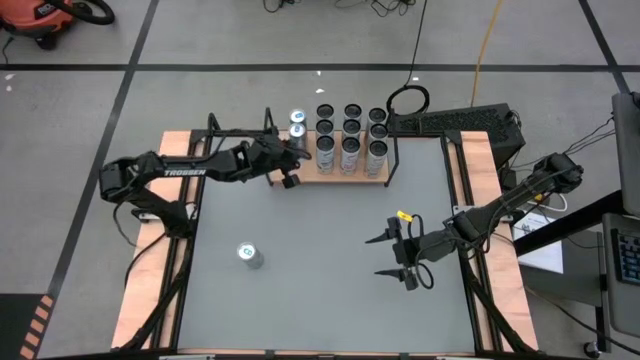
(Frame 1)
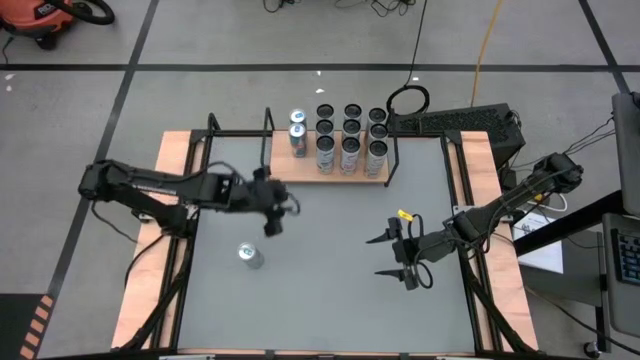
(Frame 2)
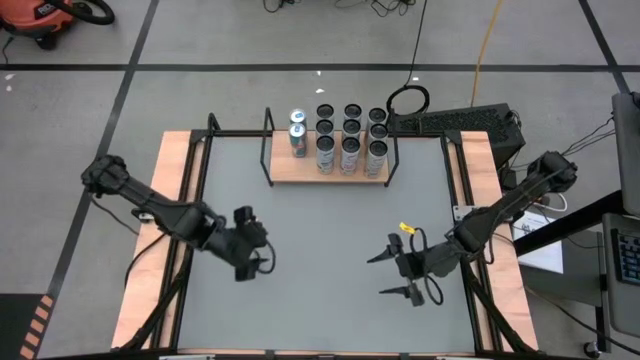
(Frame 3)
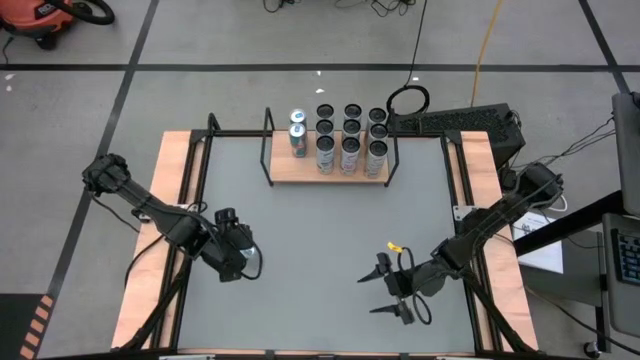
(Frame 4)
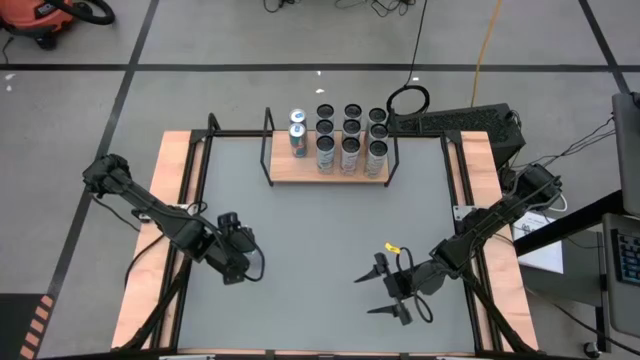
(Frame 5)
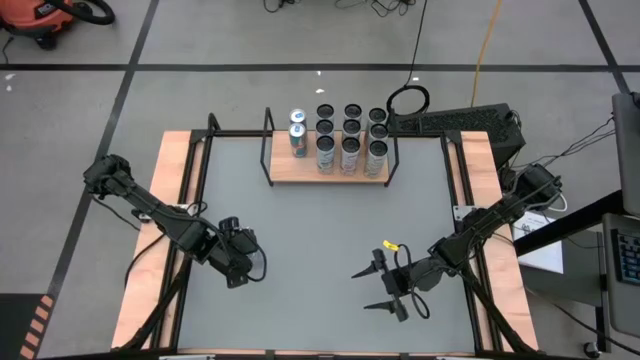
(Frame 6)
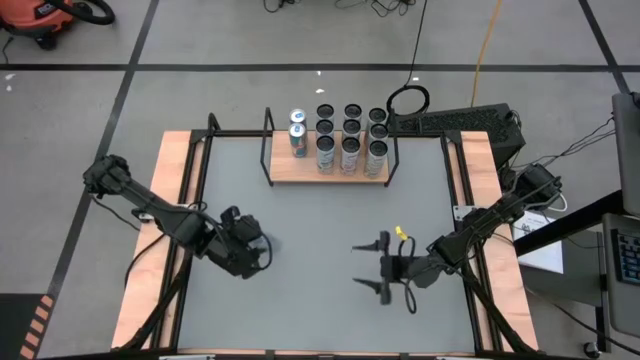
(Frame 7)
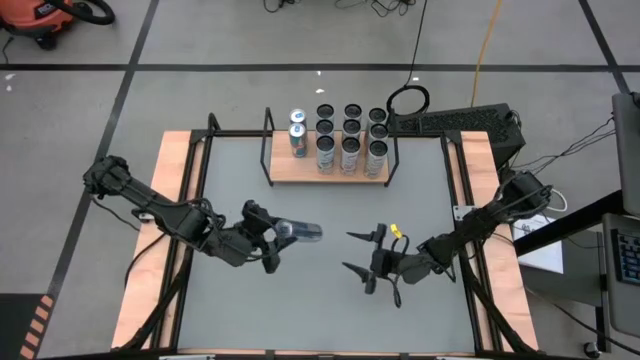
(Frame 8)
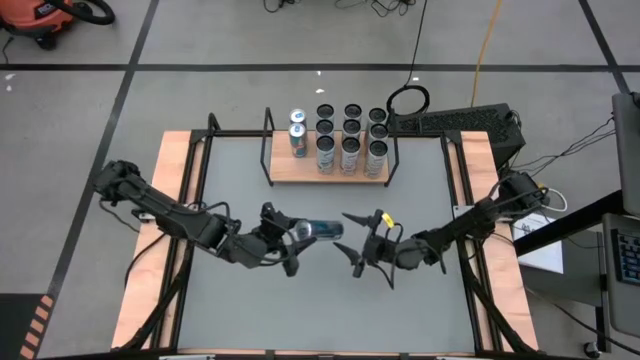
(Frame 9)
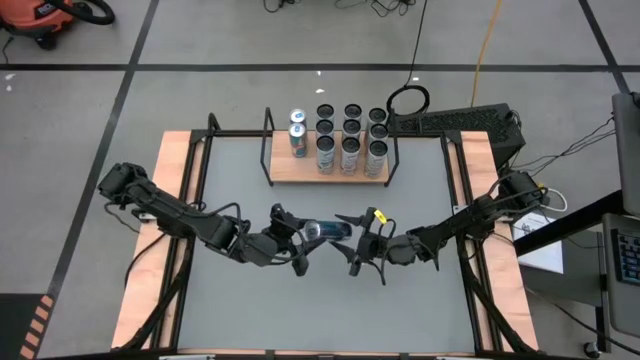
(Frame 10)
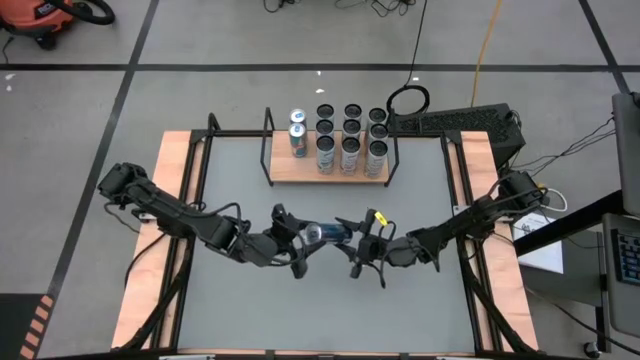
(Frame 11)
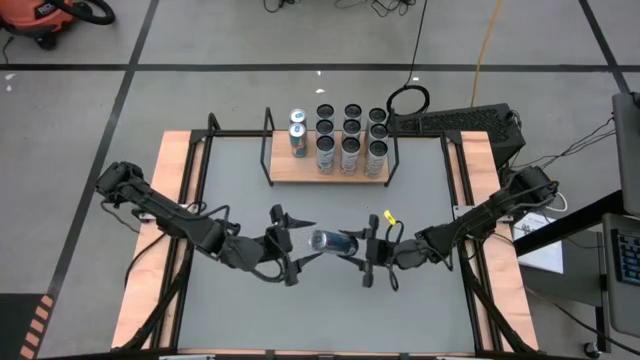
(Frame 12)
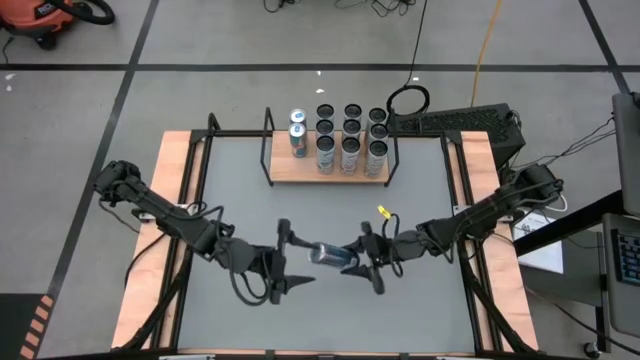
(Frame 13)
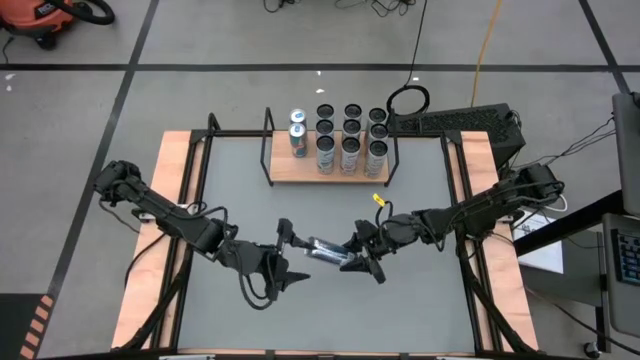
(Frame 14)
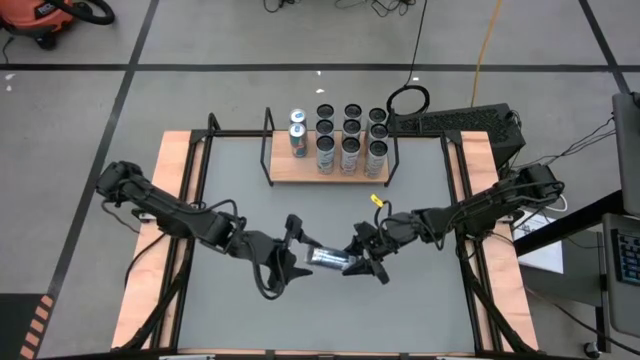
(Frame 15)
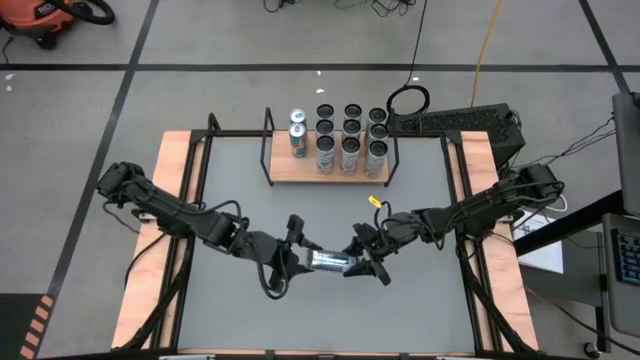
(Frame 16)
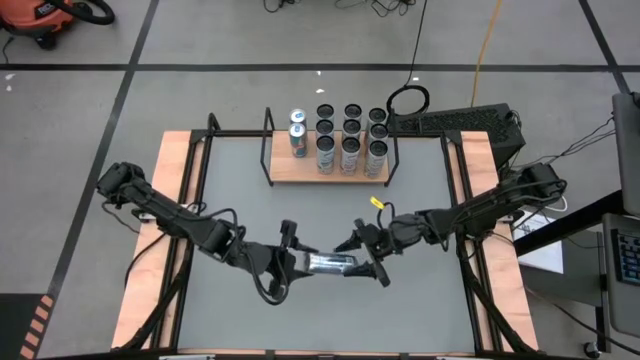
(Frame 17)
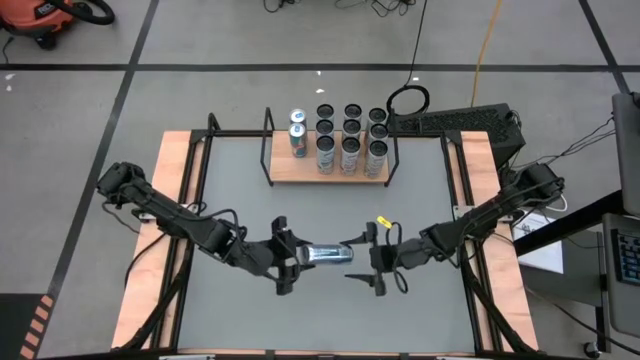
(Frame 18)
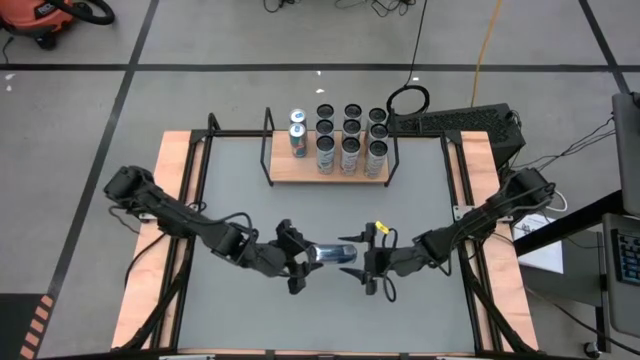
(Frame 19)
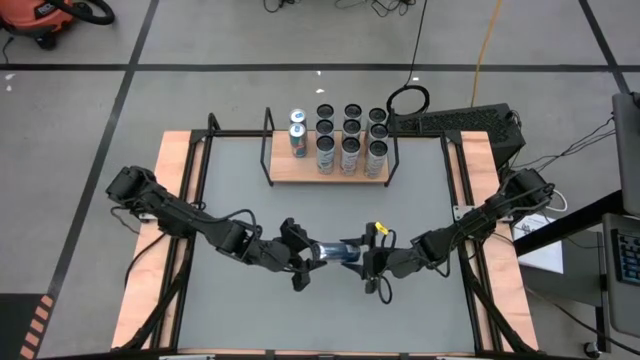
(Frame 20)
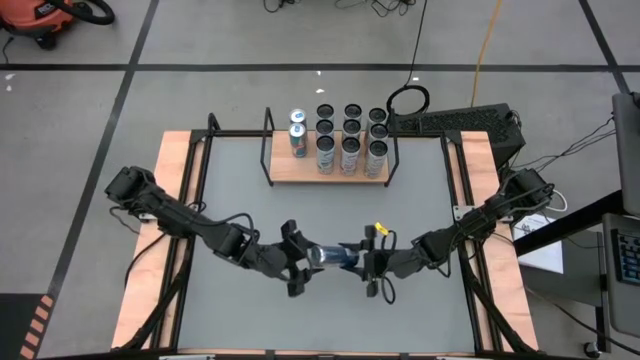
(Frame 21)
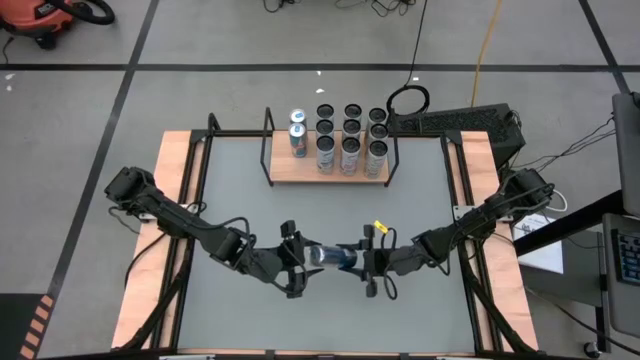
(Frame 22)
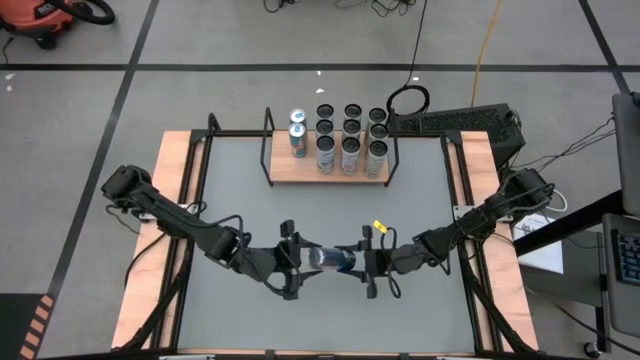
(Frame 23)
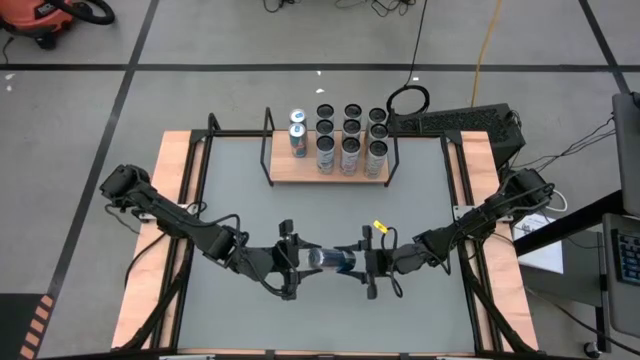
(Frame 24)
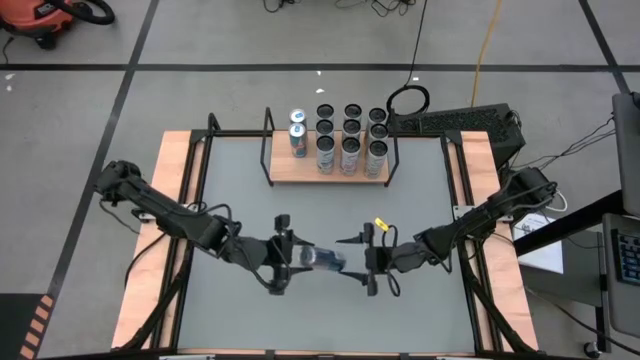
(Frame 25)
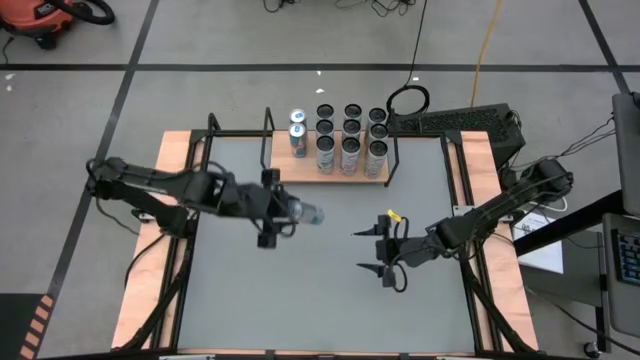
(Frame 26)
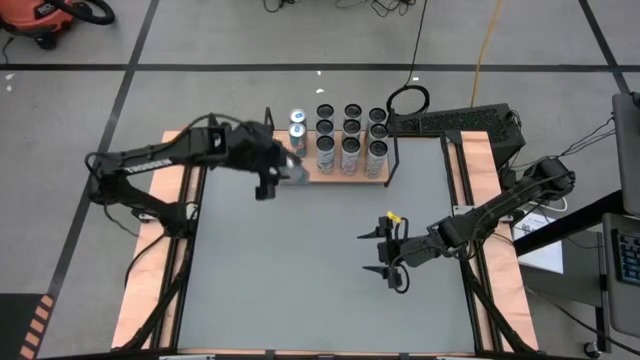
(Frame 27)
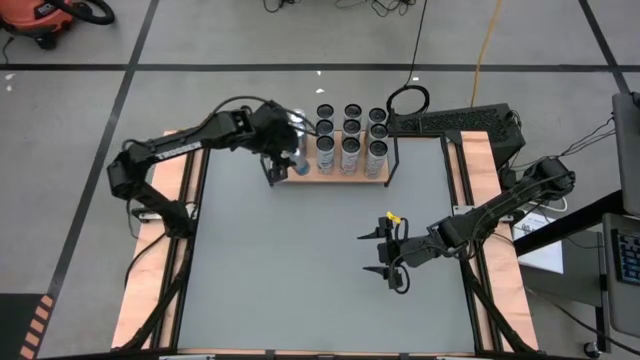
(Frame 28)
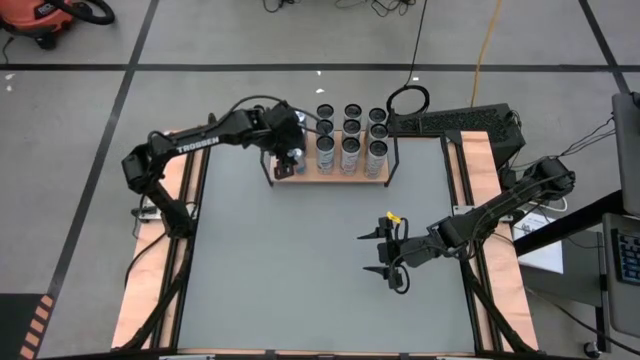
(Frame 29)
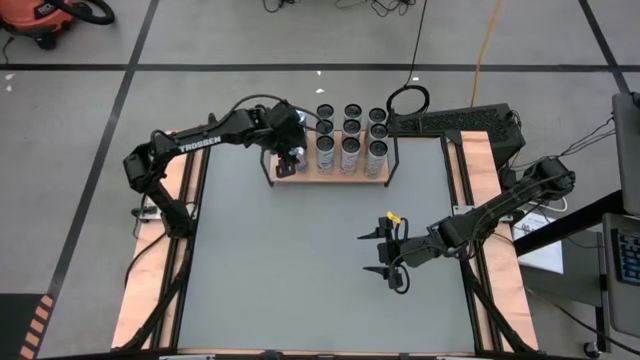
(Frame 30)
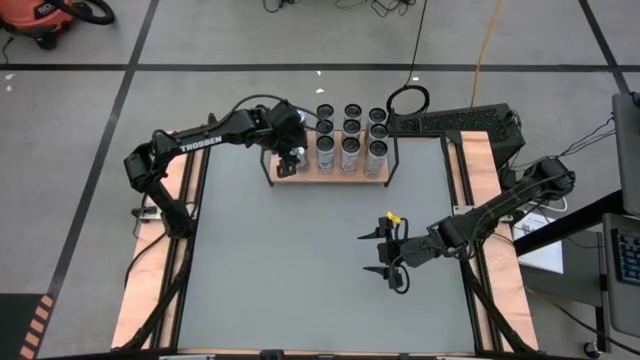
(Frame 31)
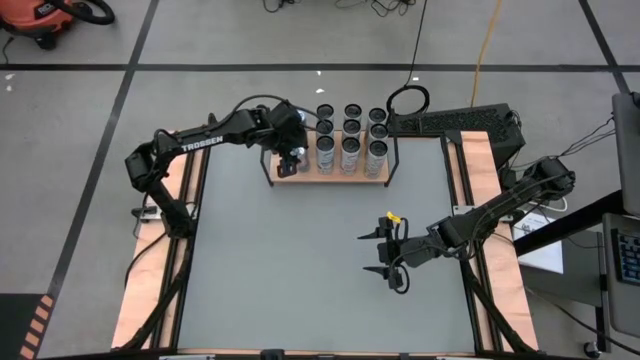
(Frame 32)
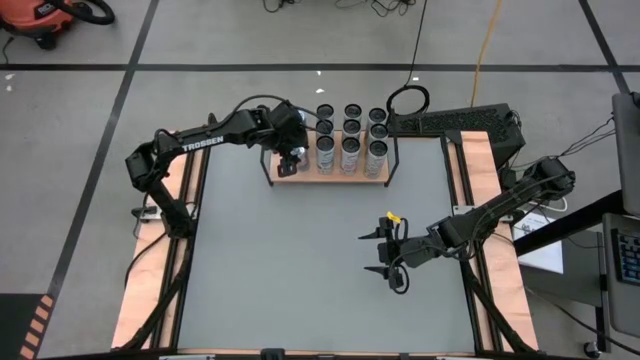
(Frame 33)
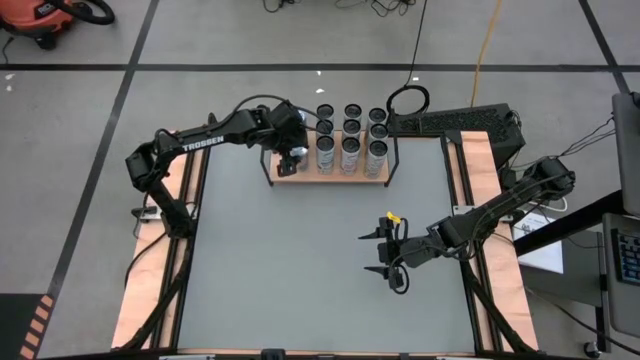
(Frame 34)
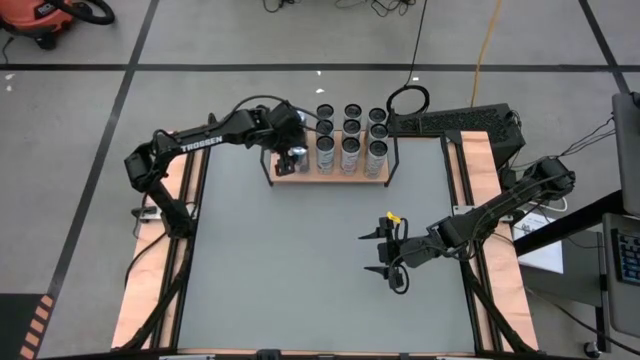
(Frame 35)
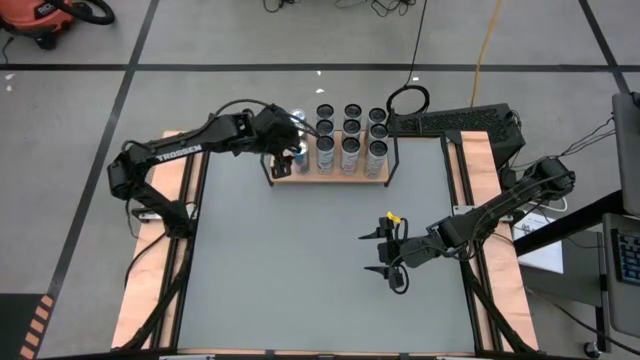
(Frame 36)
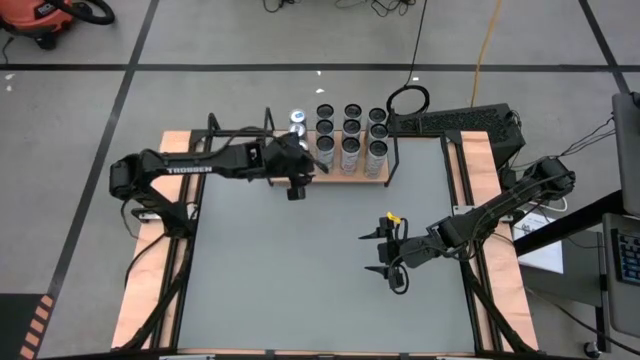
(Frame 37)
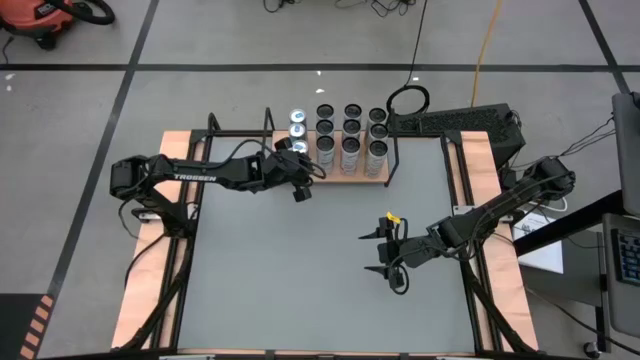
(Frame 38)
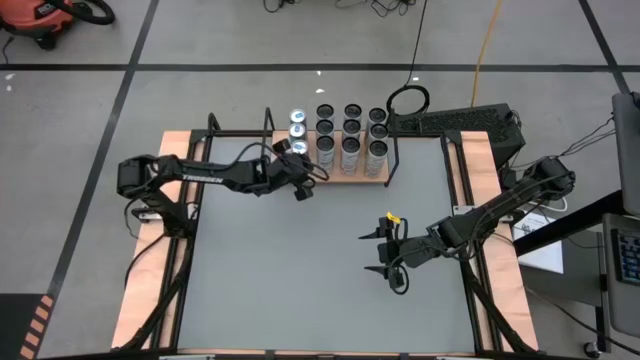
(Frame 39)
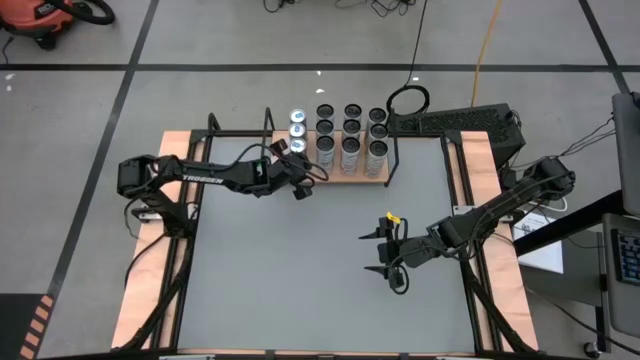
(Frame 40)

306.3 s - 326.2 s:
Task: Place canned beverage on shelf
Put the blue soda can on the shelf aligned with the blue soda cans

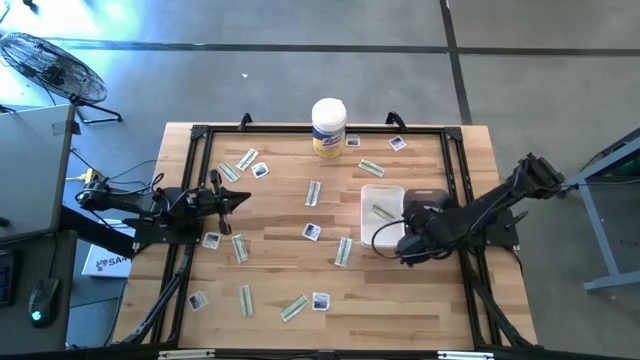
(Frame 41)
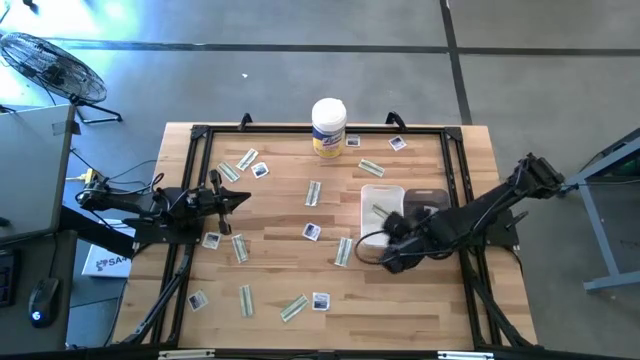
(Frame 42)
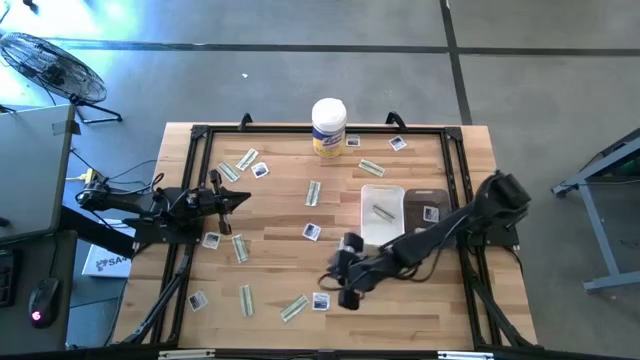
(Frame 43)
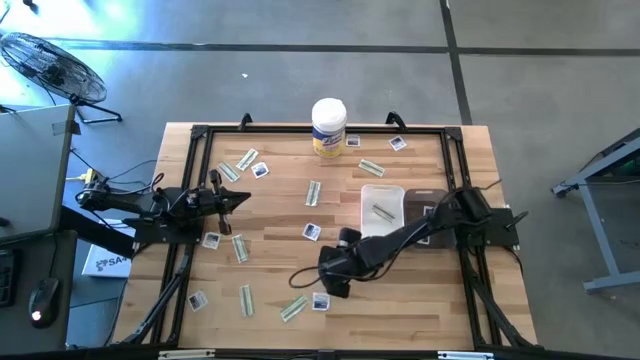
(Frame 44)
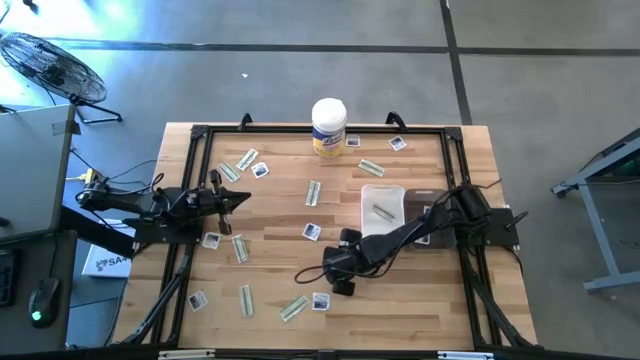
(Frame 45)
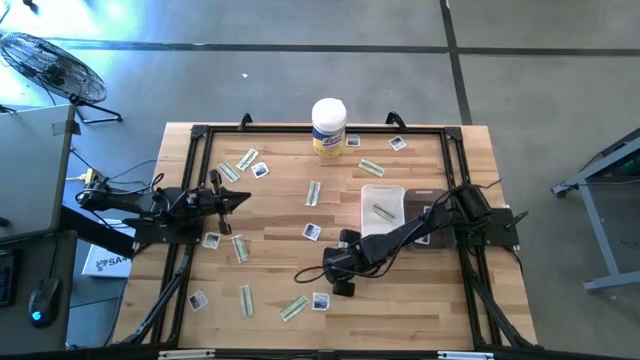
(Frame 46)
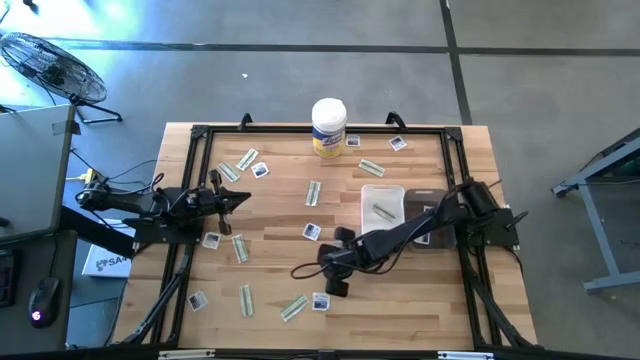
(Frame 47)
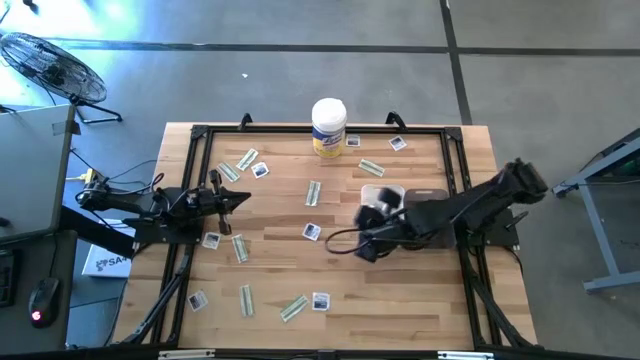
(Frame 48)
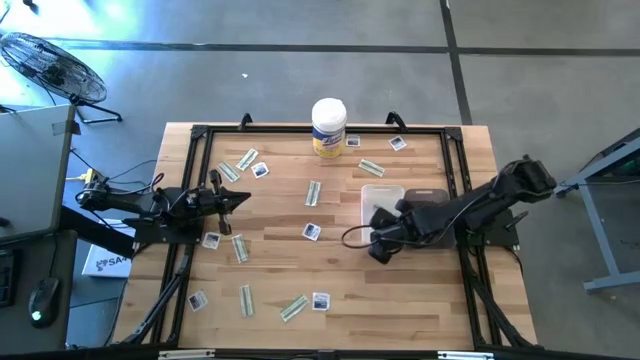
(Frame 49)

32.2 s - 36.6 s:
Task: Pick & Place First Aid Supplies
Put the green bandage pack into the white bin
